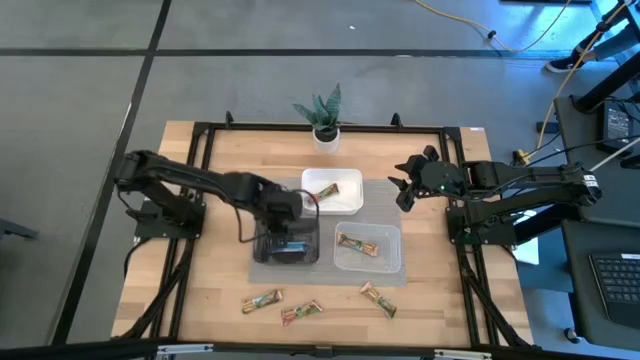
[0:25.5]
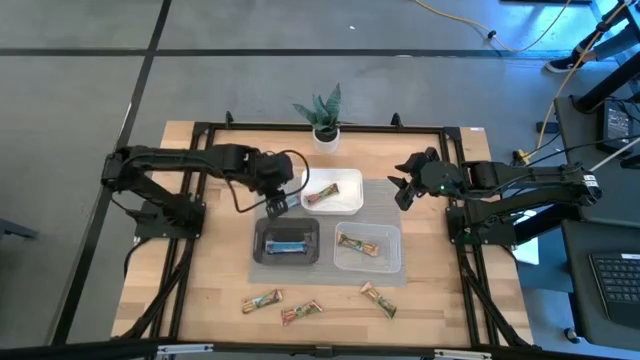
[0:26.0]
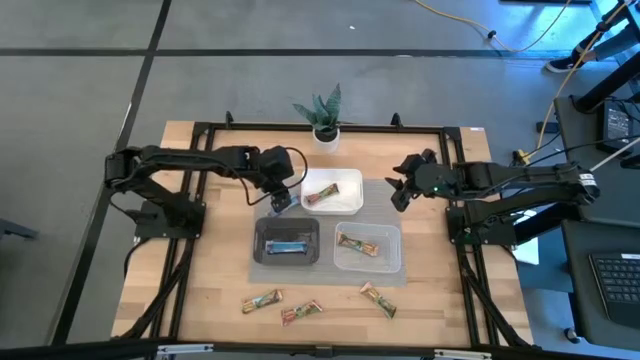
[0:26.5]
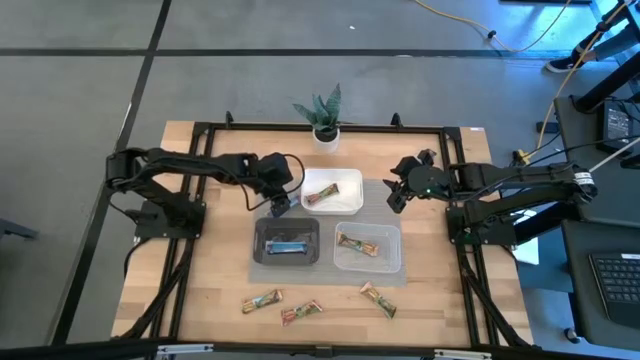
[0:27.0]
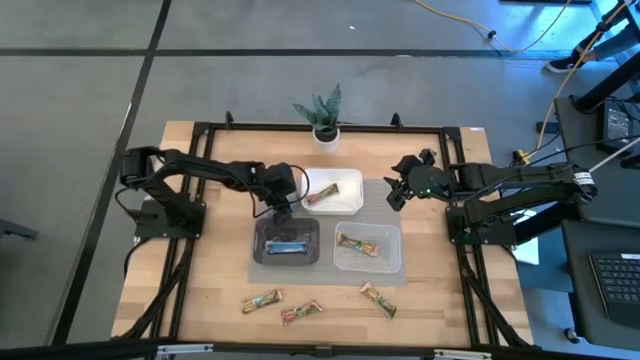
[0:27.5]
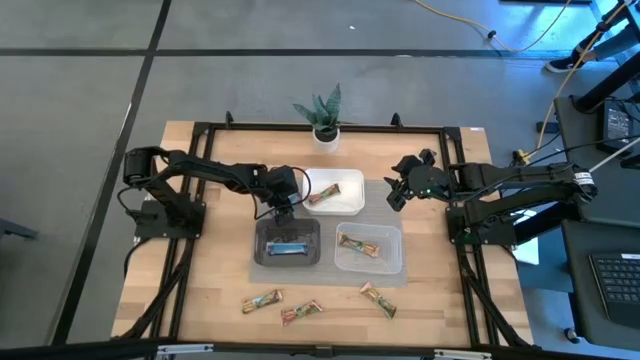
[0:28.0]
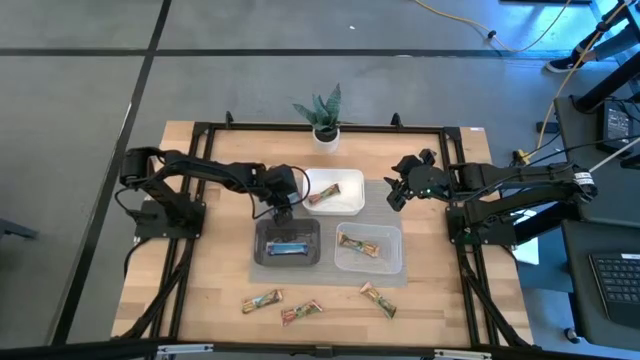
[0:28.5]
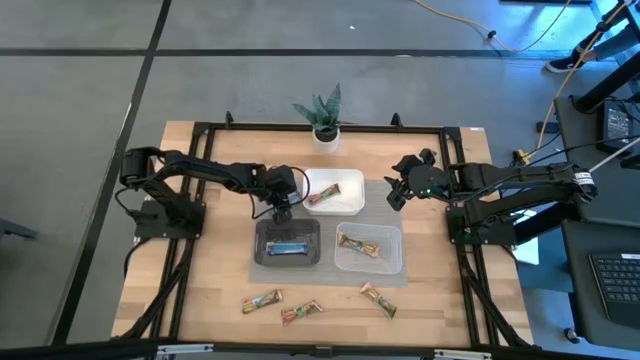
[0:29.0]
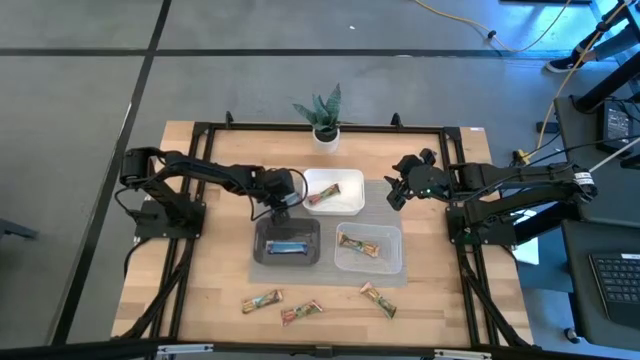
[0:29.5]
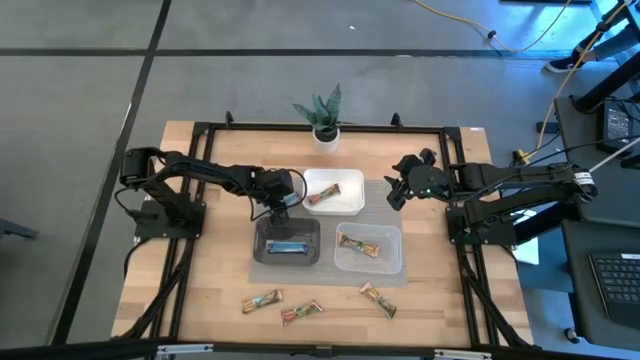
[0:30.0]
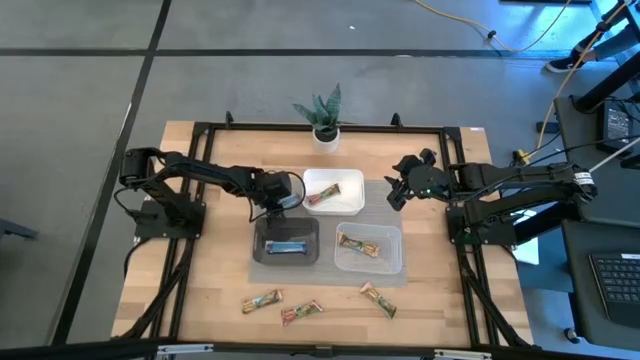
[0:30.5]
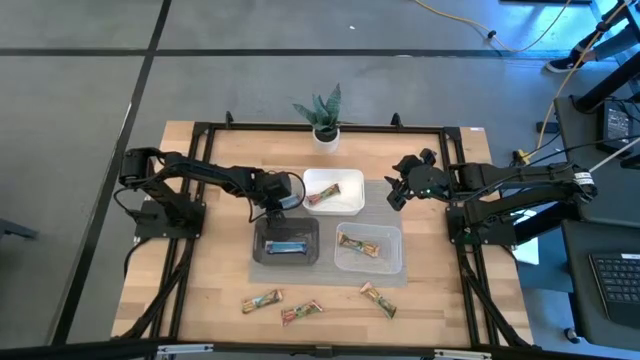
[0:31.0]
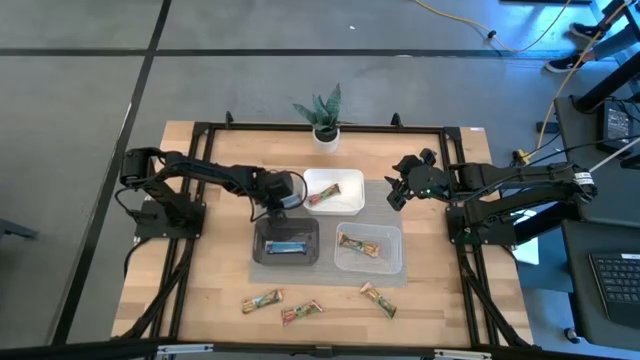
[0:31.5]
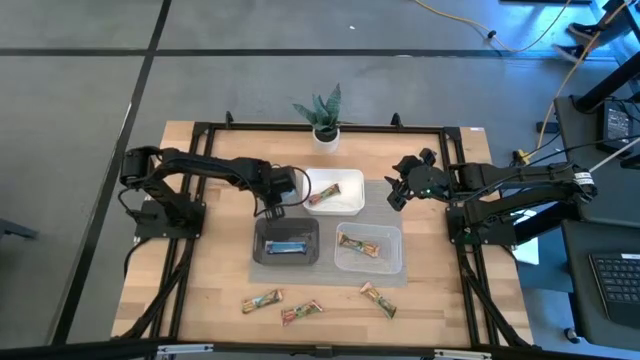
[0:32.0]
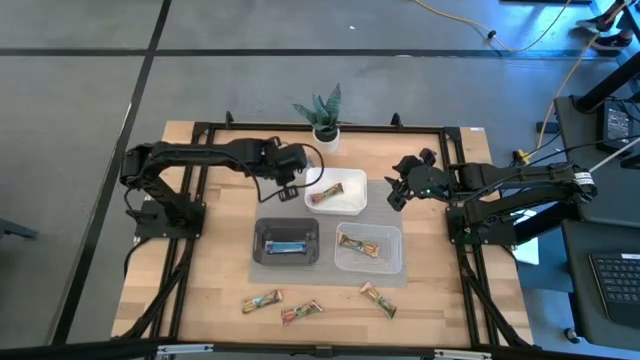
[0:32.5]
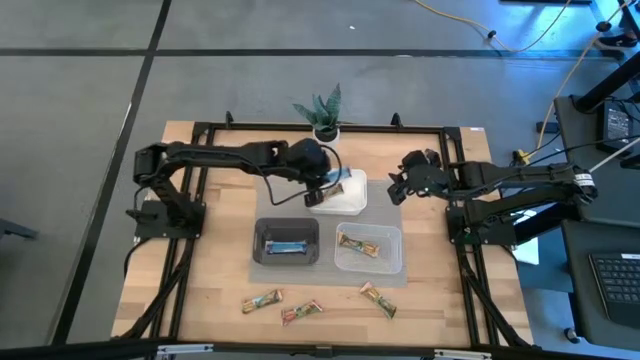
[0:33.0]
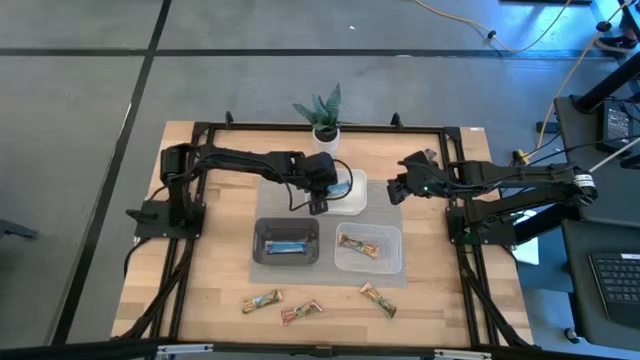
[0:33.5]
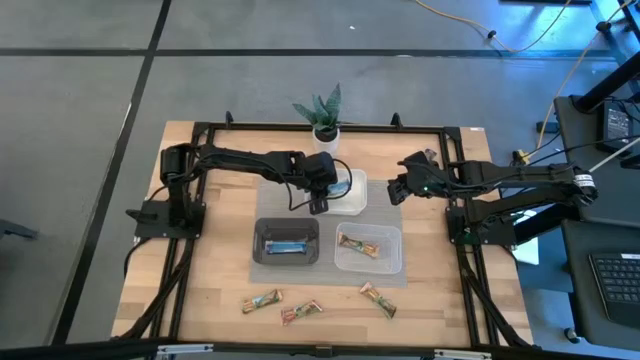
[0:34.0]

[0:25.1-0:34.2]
Task: Pick and place Granola Bars by type
Put the top red granola bar into the white bin

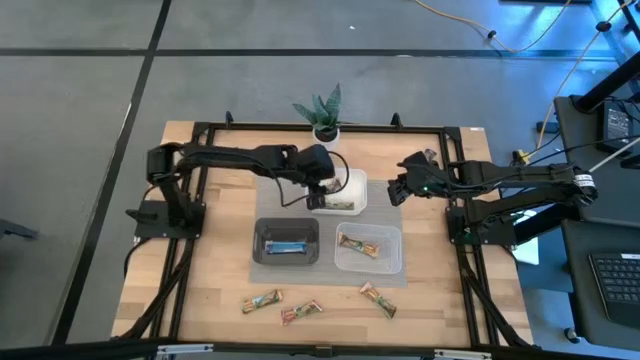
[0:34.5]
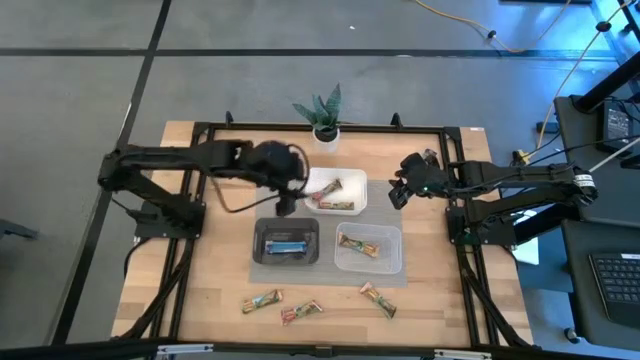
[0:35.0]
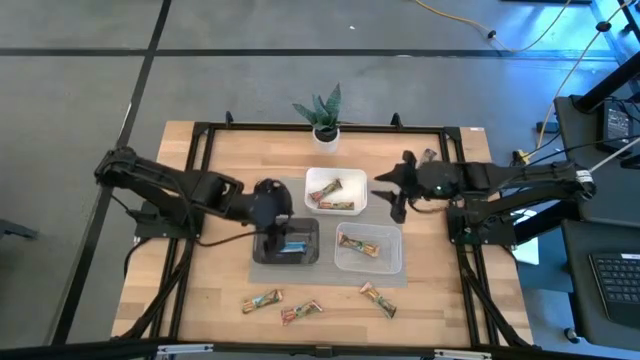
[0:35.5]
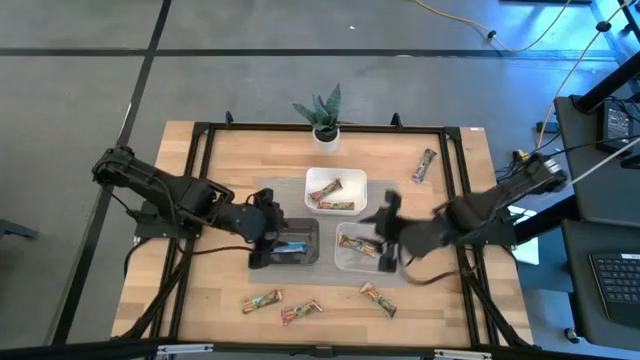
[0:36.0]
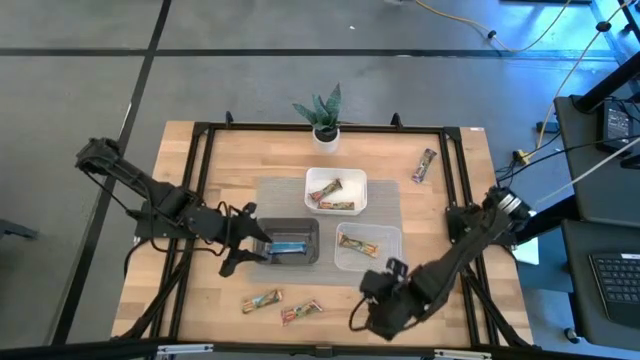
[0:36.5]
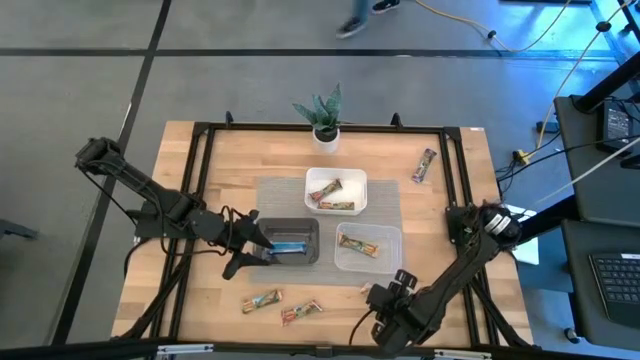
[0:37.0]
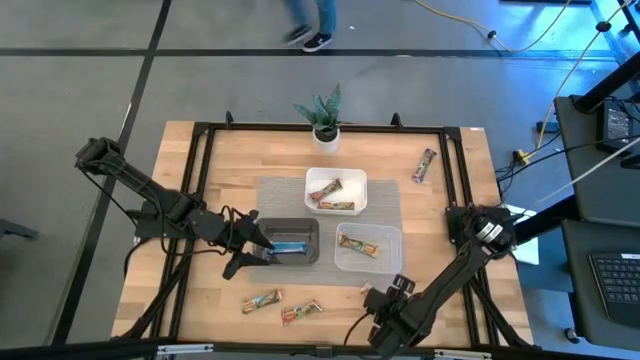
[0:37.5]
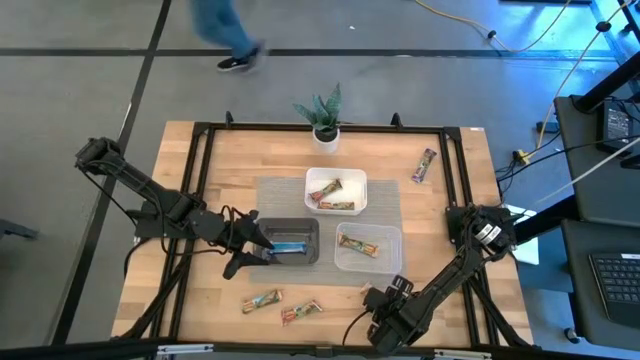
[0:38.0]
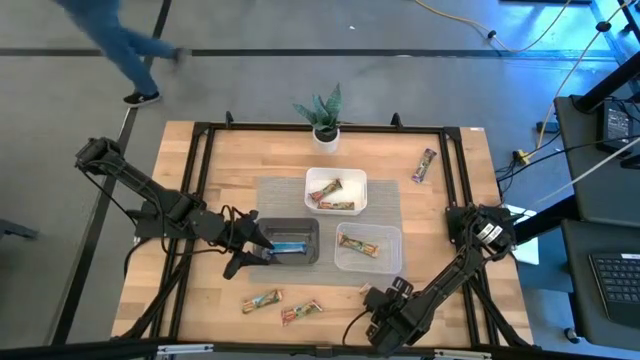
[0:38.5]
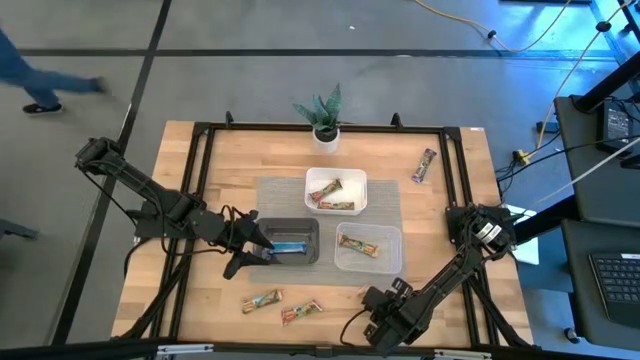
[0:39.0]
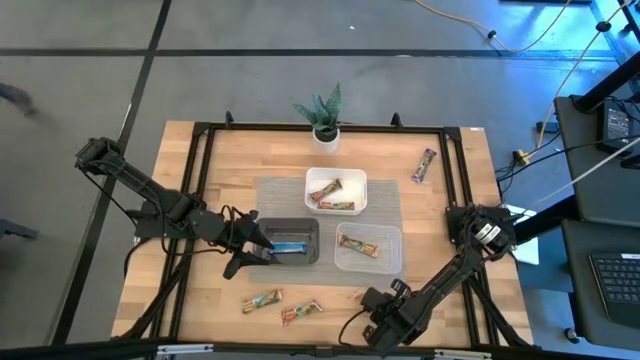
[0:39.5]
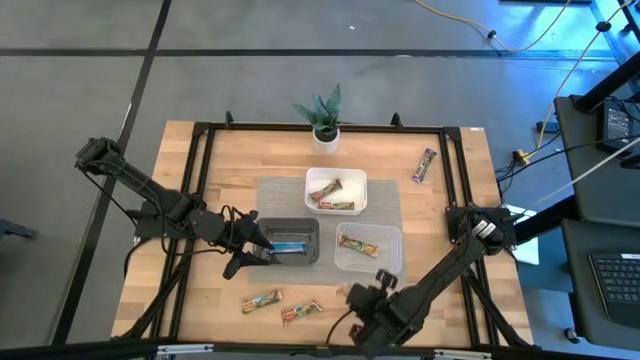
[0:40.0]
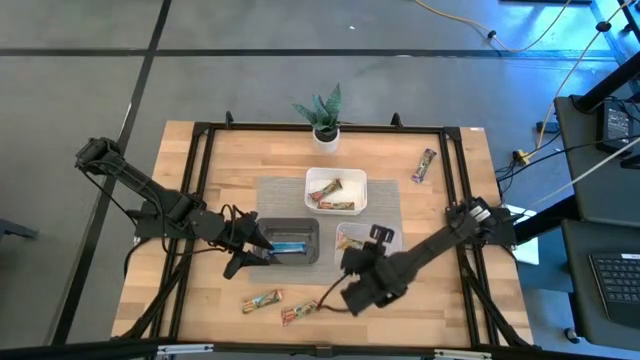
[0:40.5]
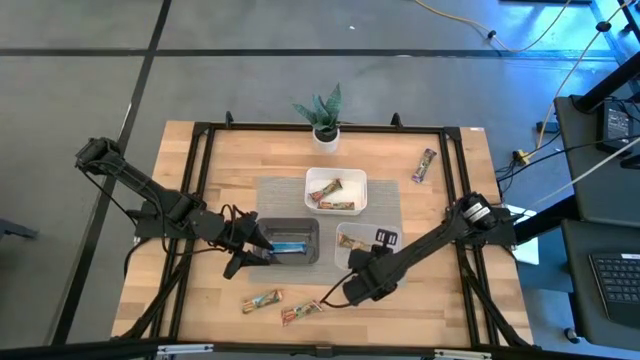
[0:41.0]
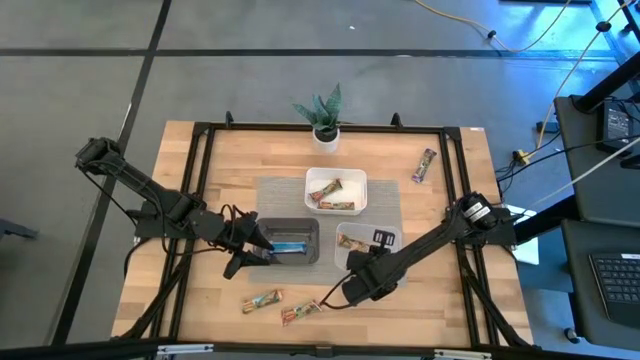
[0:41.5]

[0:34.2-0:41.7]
Put the right yellow granola bar into the transparent bin

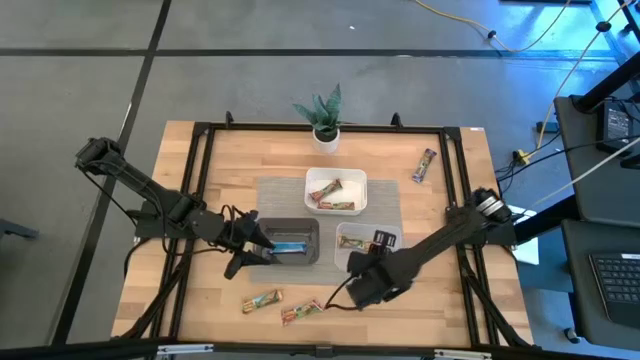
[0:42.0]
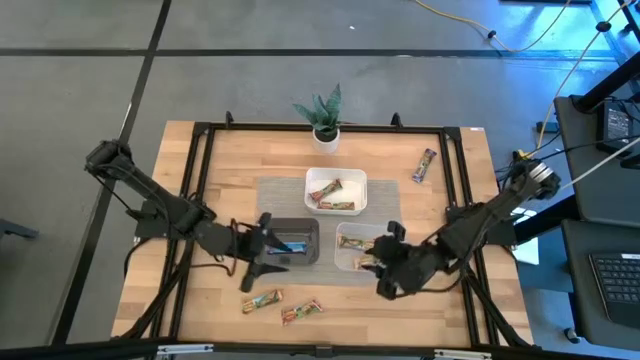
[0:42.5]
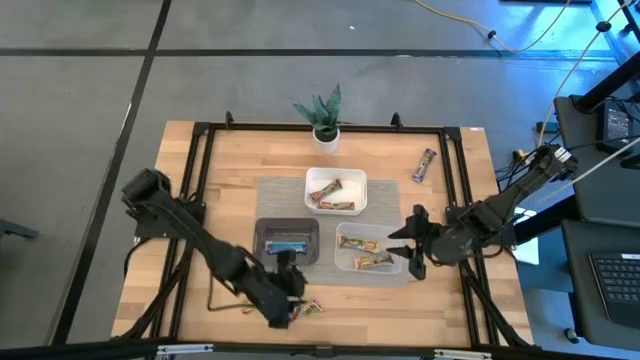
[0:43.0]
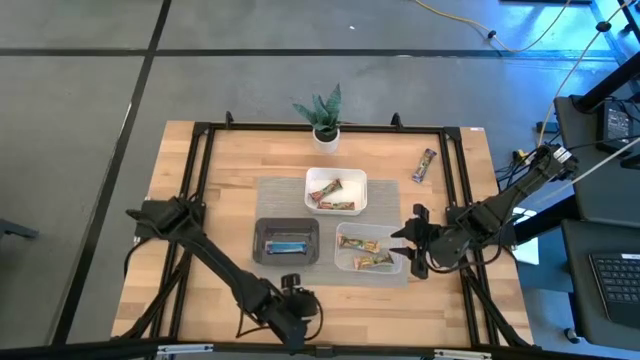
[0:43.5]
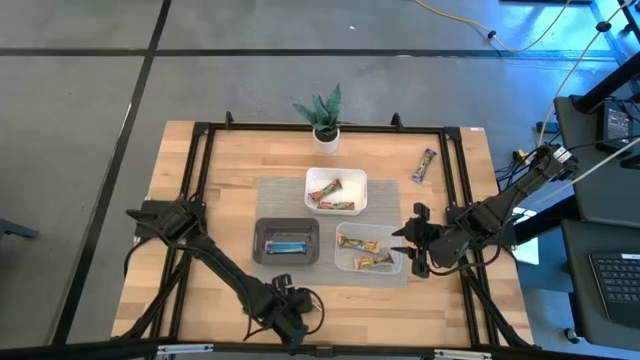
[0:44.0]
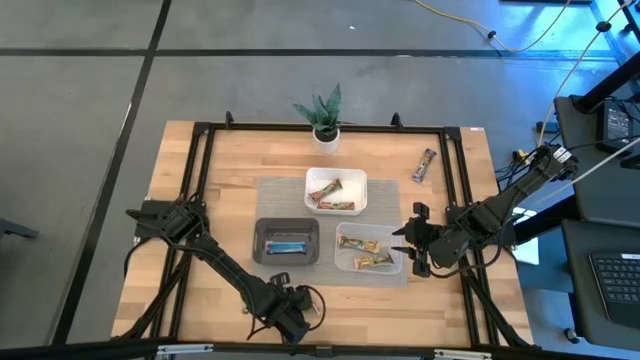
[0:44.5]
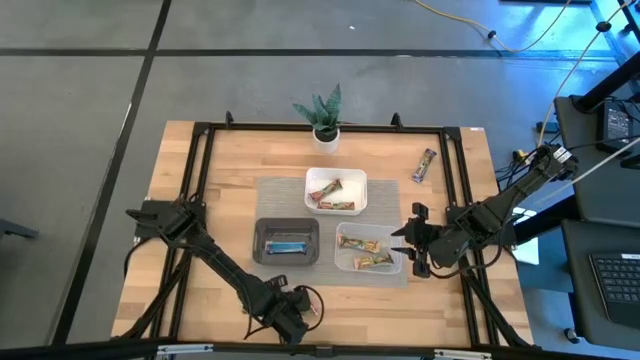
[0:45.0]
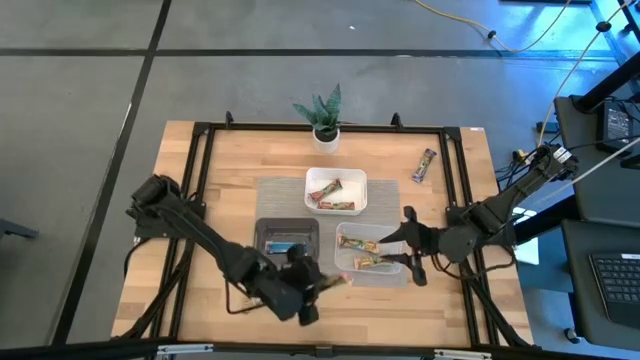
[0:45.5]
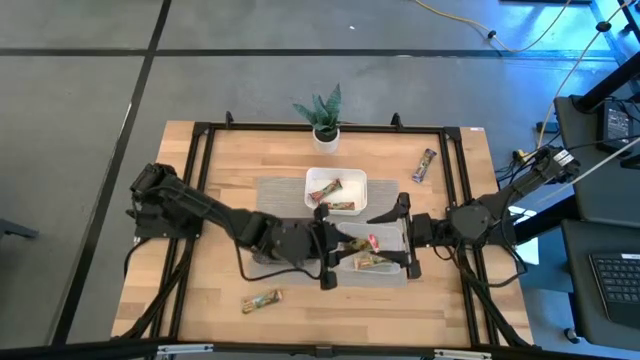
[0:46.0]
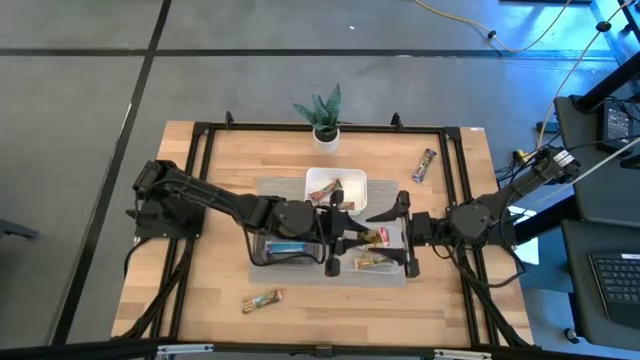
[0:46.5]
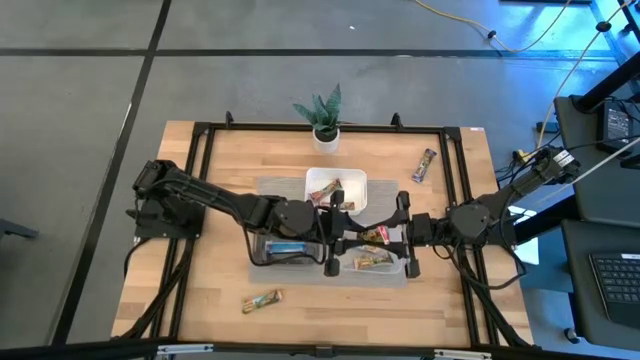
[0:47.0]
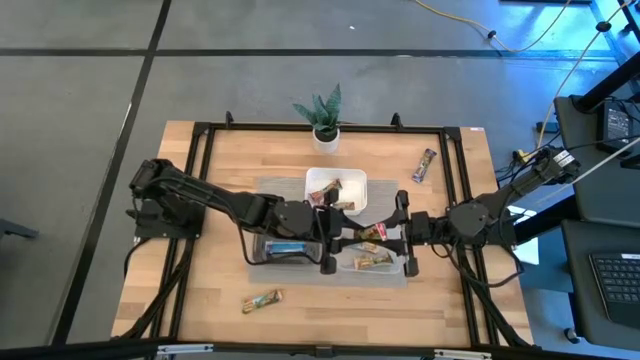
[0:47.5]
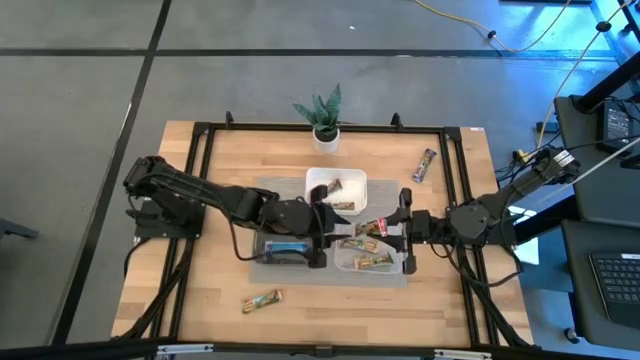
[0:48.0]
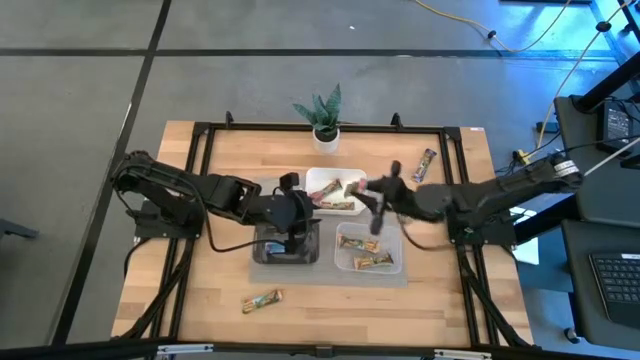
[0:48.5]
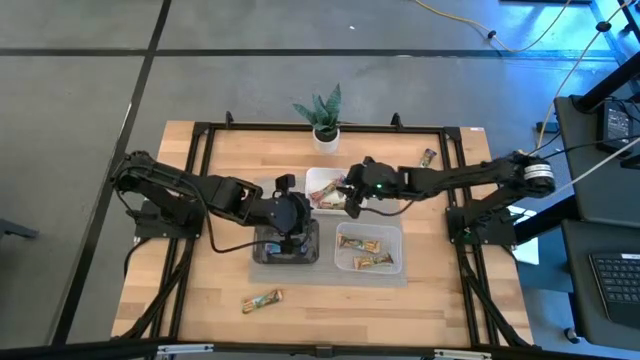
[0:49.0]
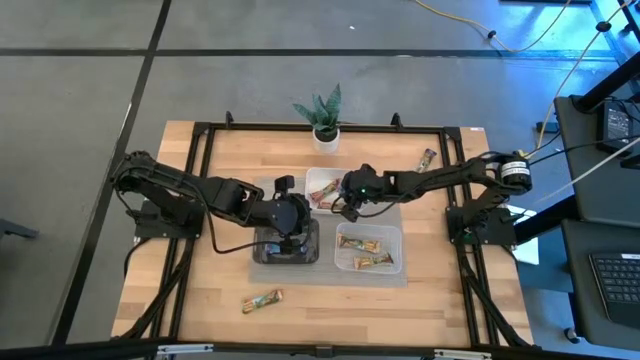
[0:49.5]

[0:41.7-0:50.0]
Put the red granola bar into the white bin
